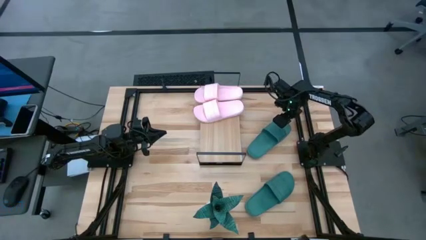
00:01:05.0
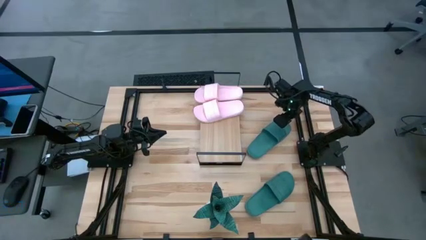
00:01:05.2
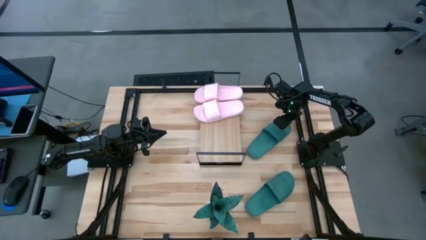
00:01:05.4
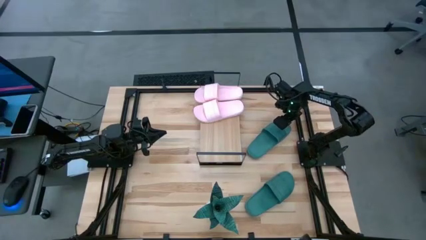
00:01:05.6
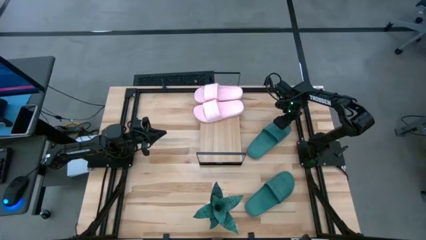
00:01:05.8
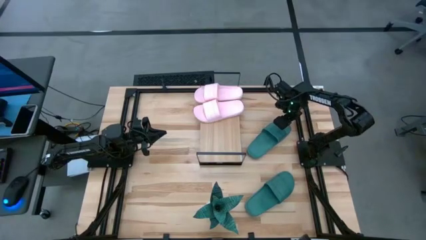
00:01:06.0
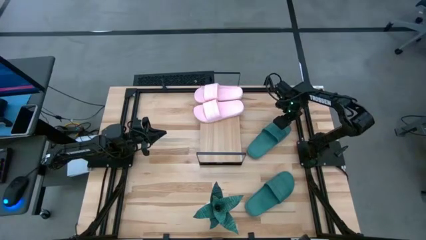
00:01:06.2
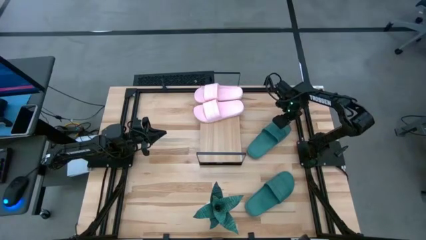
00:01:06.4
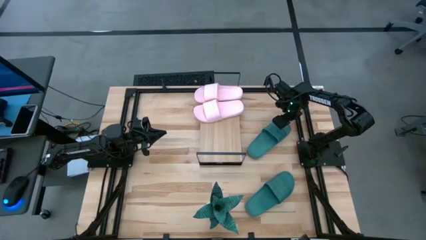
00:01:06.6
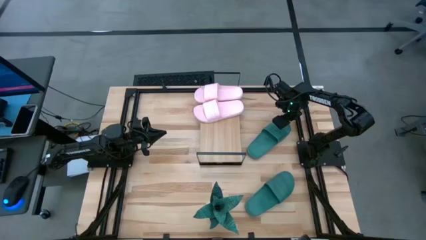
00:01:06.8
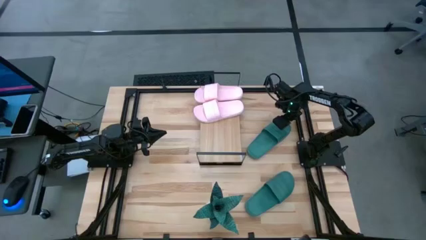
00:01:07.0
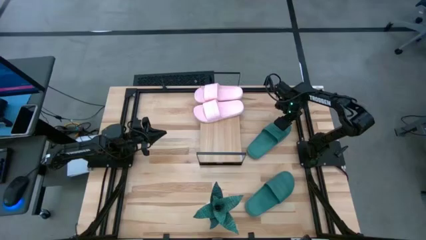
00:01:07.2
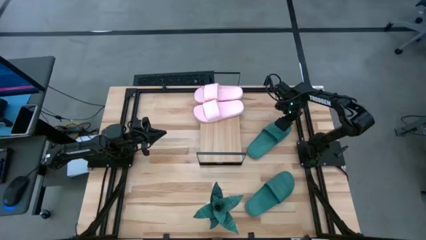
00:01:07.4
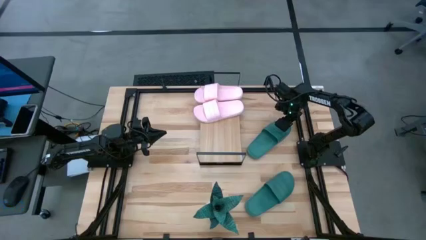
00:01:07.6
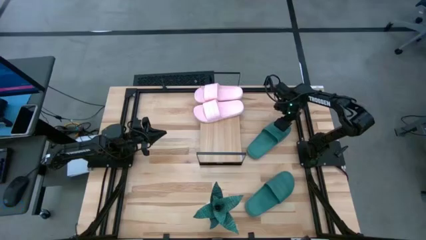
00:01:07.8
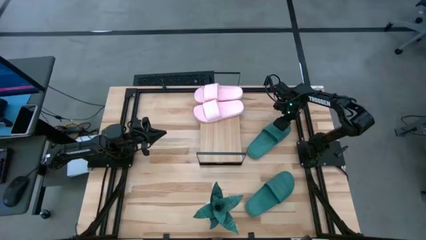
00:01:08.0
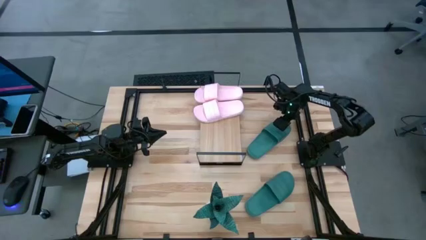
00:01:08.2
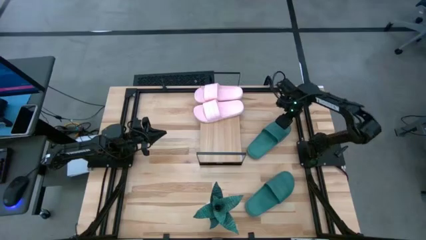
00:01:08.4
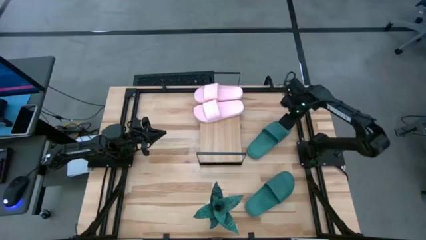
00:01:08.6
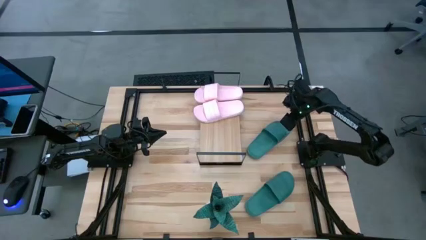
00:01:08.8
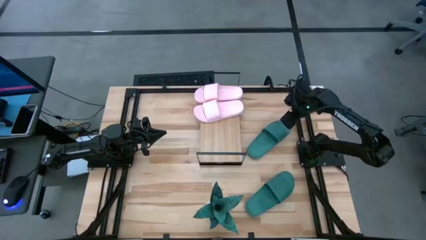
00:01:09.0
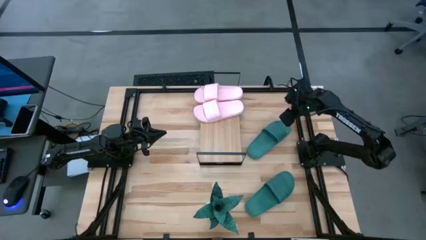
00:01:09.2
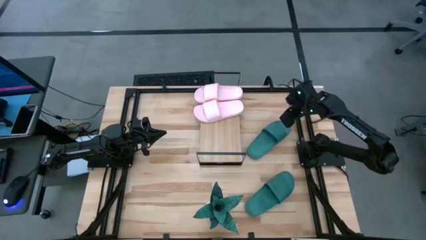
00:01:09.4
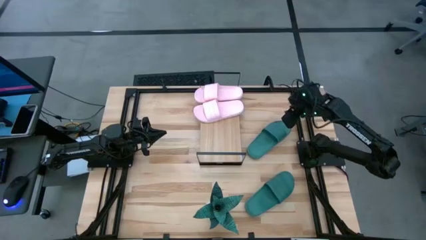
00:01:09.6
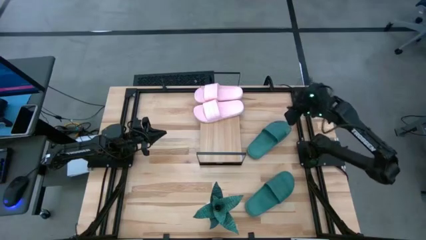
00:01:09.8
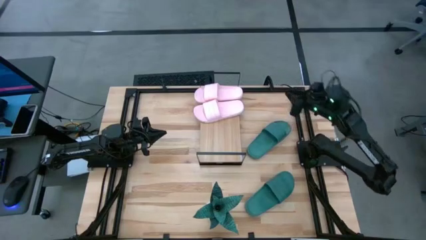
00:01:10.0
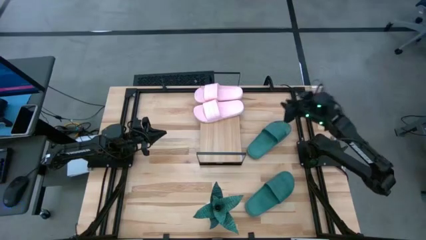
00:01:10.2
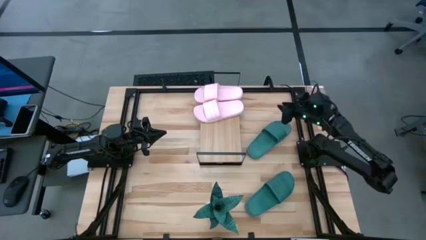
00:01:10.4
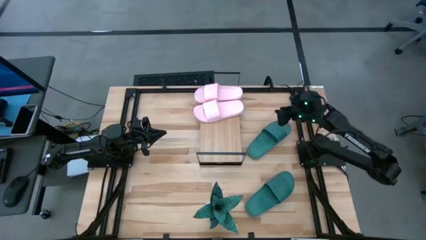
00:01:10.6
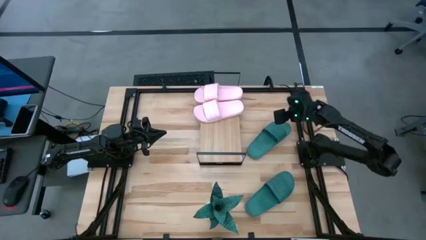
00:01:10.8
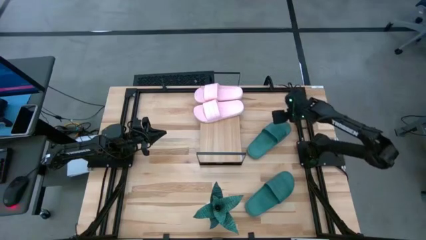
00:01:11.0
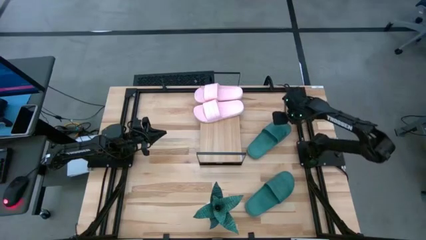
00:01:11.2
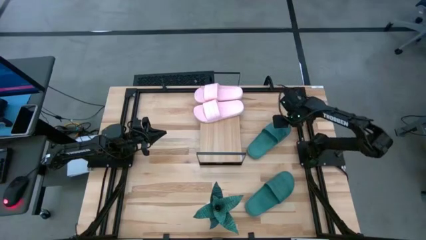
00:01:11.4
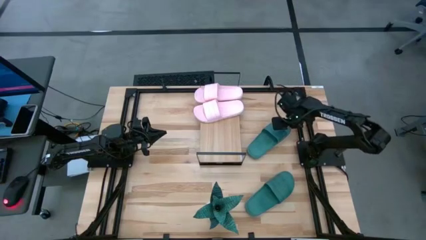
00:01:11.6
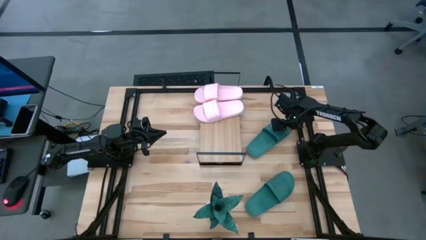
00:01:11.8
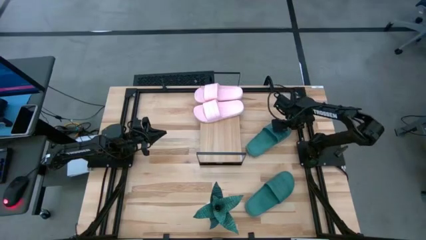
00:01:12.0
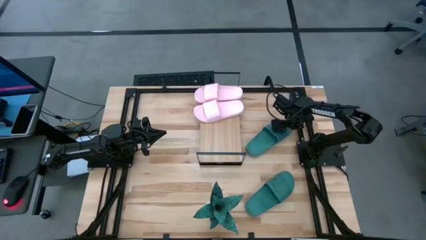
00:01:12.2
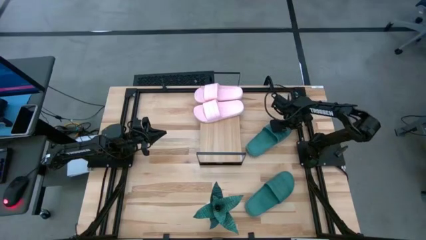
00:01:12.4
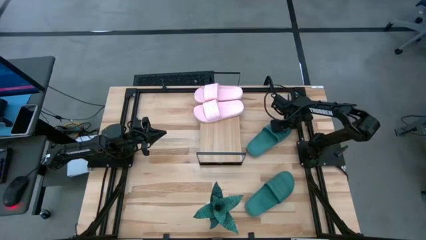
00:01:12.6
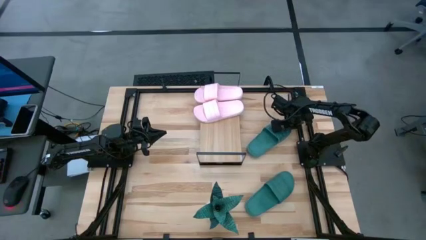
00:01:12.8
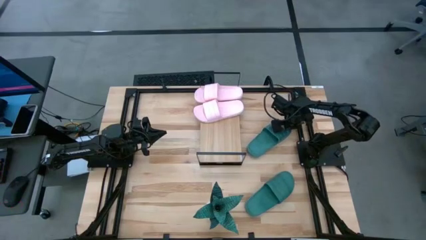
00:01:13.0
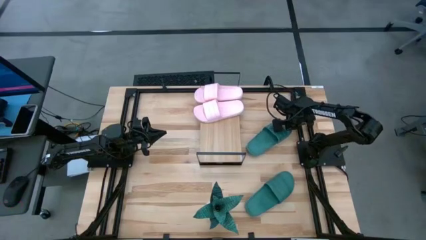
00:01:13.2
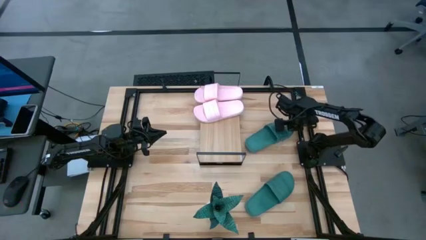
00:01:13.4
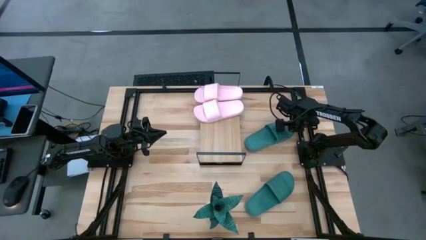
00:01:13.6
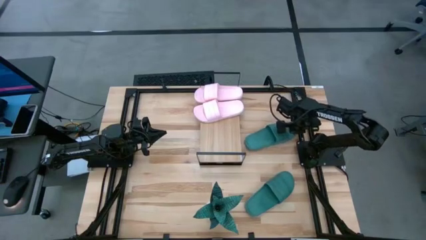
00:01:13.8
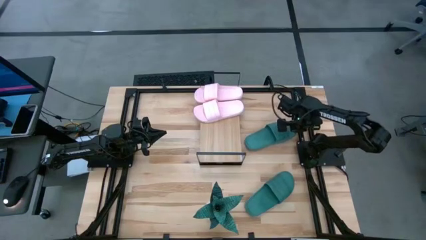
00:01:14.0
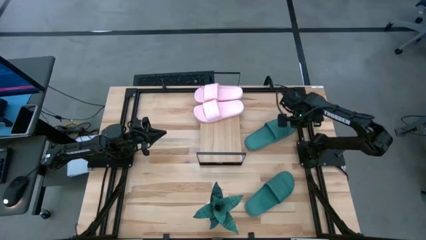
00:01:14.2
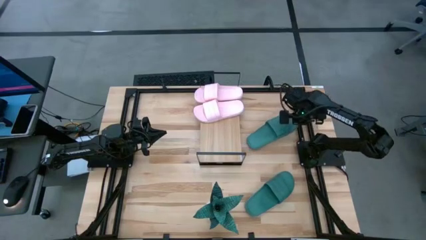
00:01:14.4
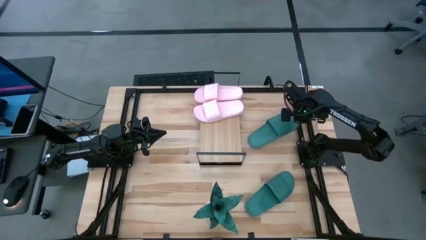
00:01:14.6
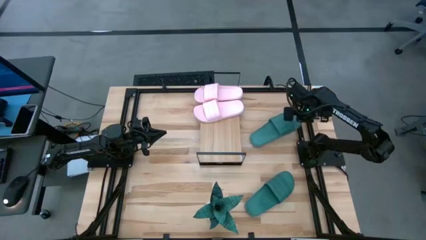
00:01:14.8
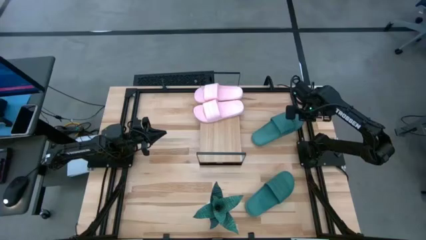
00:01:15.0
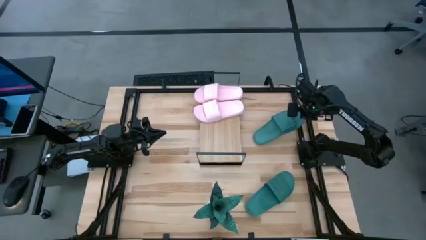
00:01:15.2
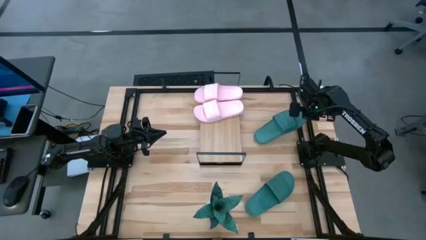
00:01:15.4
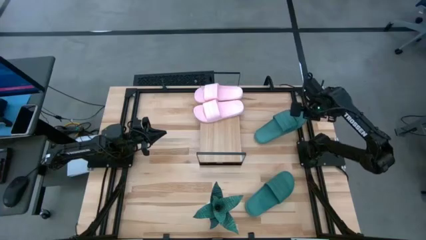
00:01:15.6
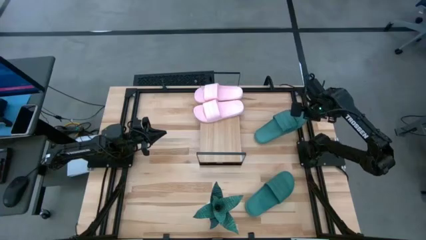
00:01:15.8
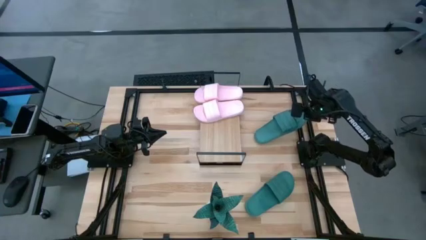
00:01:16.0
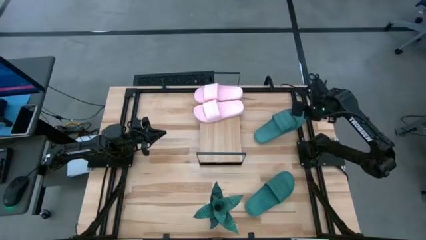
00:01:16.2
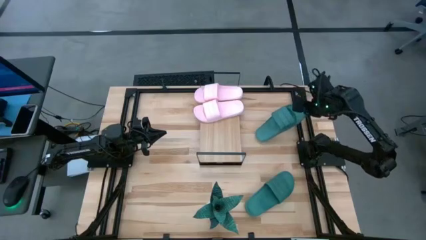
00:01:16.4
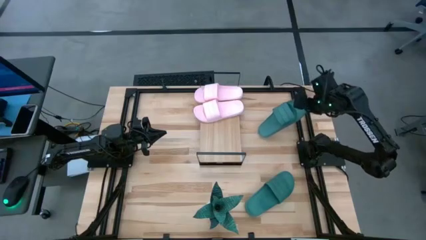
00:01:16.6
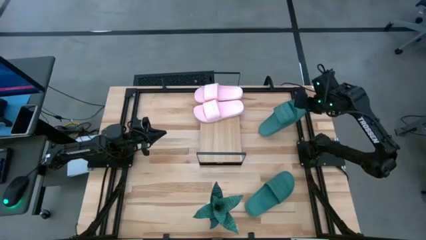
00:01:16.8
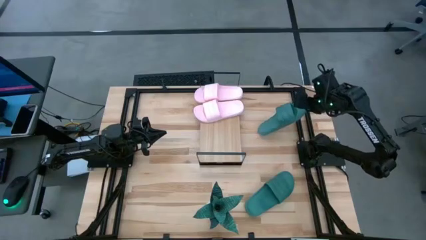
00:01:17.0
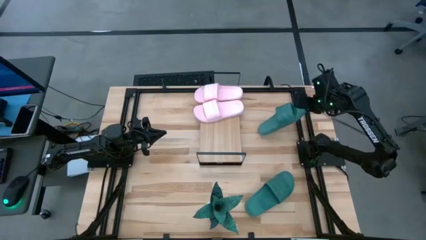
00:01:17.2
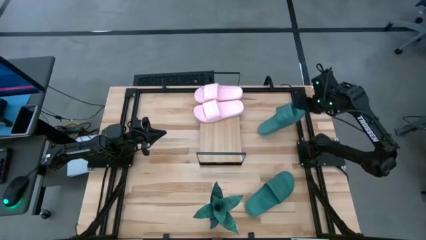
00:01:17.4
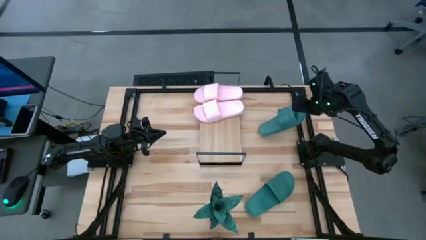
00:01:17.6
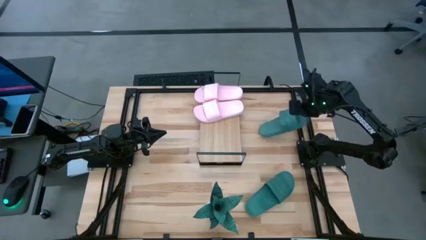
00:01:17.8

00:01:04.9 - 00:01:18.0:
Task: Pick and place slides into the shelf
Put the top green slipper on the shelf

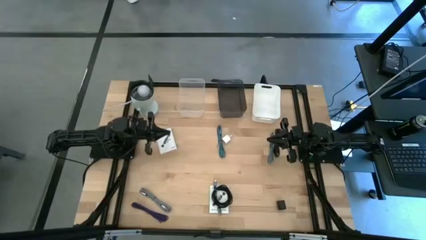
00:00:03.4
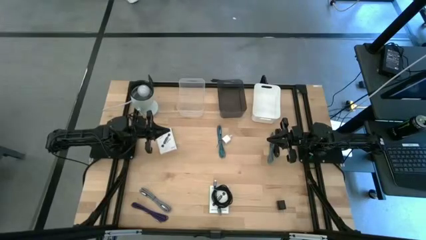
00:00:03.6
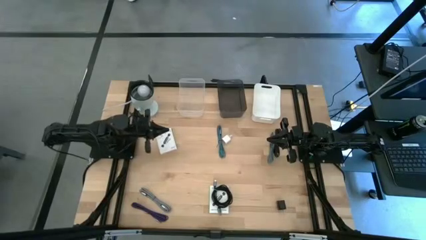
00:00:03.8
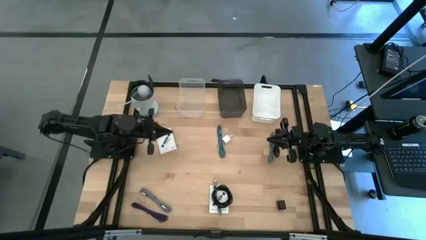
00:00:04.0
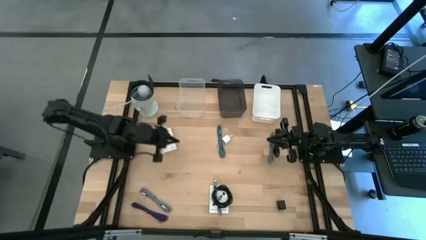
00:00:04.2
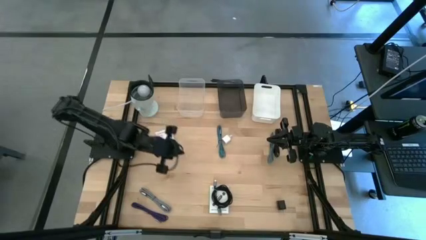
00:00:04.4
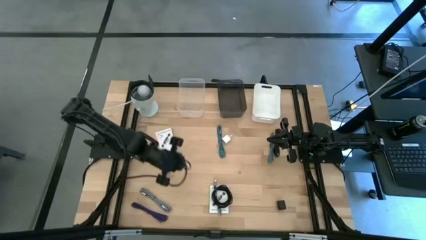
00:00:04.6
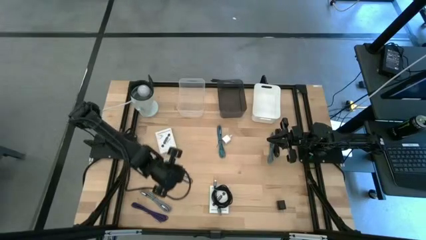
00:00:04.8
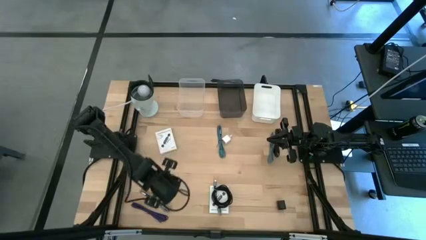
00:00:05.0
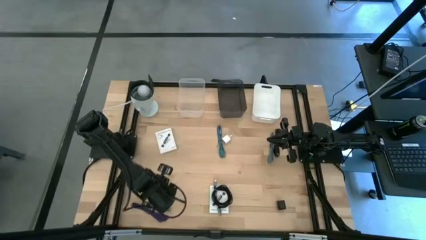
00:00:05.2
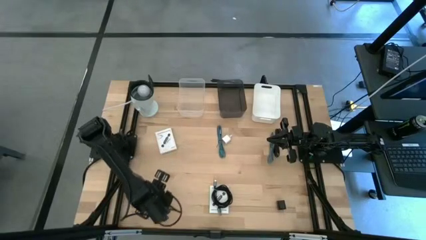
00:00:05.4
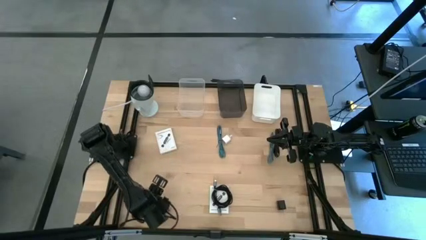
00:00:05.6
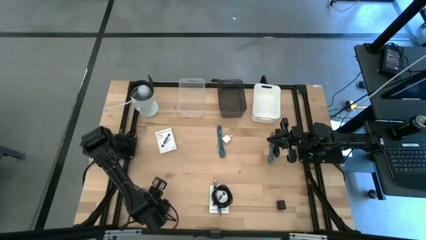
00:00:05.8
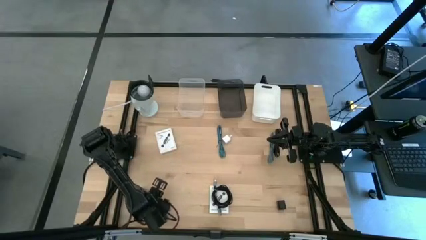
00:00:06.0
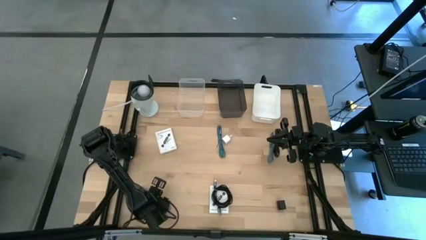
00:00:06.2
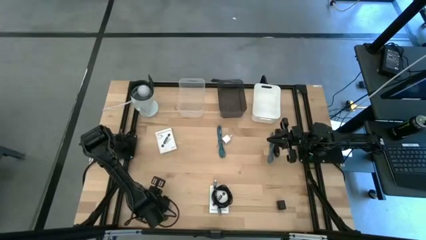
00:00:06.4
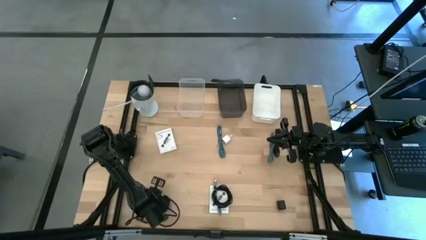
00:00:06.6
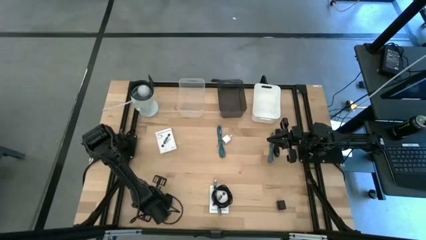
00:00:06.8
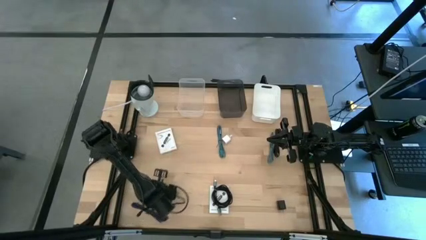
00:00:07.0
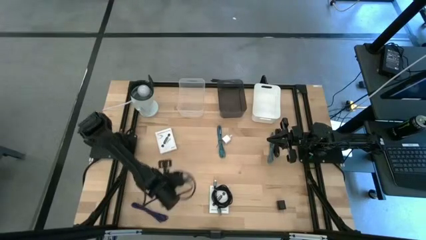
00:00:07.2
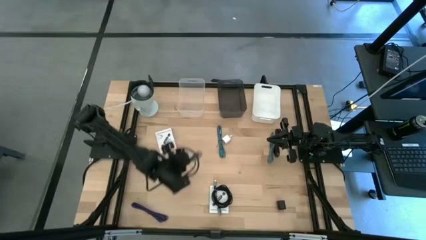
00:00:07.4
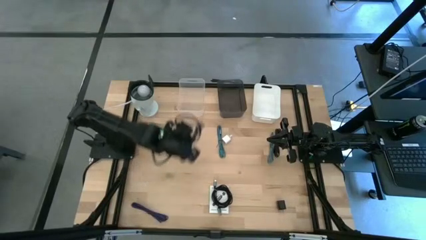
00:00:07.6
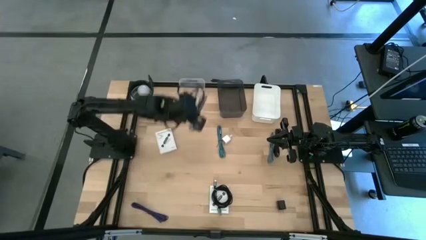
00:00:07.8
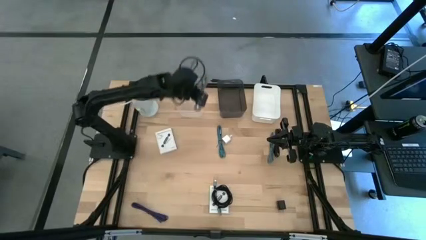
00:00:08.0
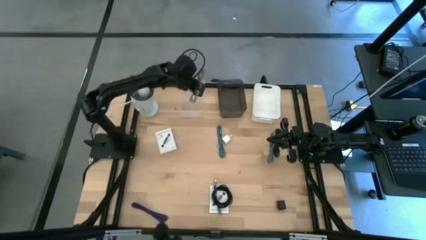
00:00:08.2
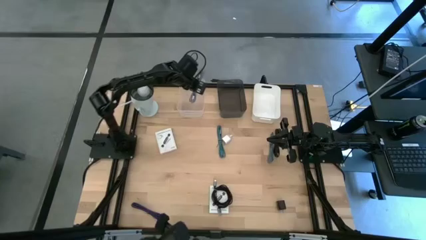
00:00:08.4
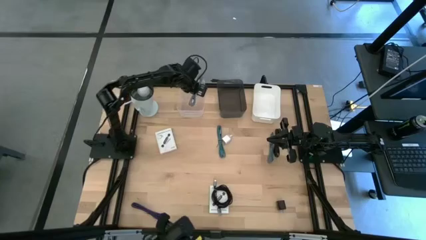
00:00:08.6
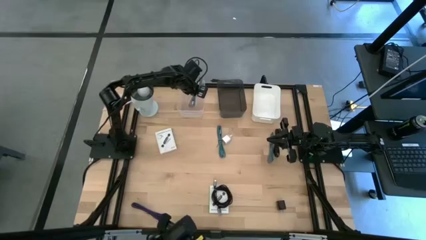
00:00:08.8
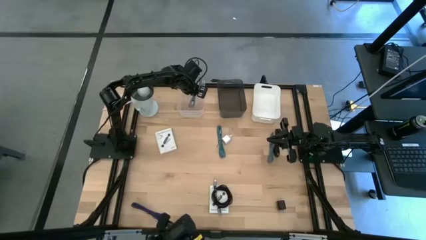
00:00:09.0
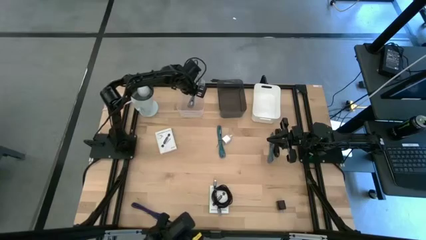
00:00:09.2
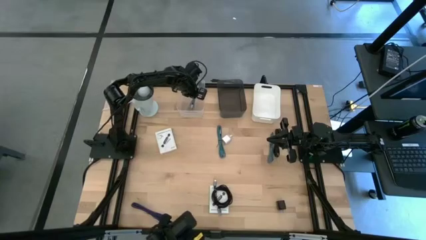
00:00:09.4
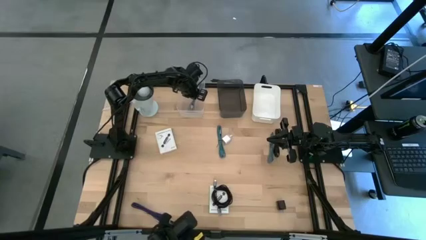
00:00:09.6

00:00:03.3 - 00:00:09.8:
Task: Pick and place items into bin
Put the black and white charger cable into the transparent bin
